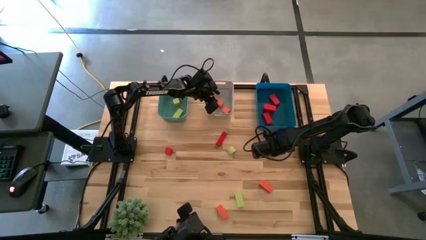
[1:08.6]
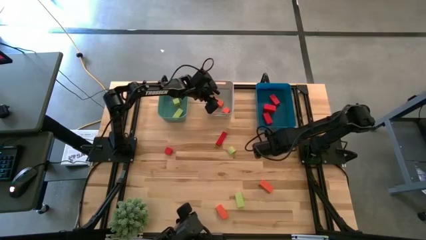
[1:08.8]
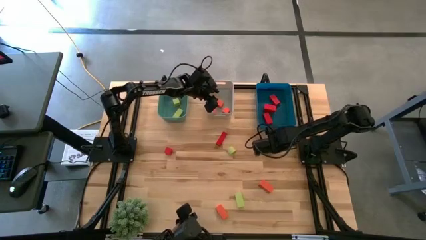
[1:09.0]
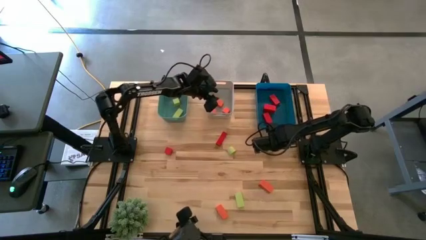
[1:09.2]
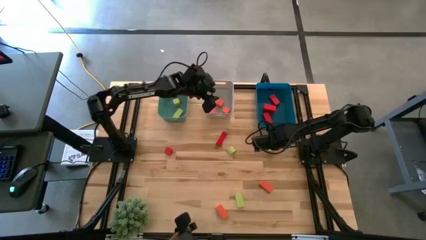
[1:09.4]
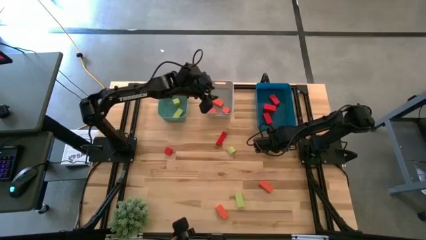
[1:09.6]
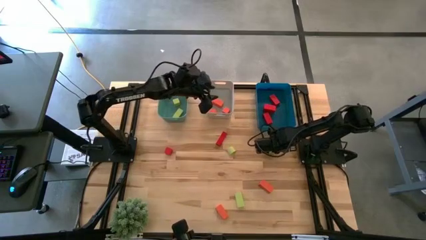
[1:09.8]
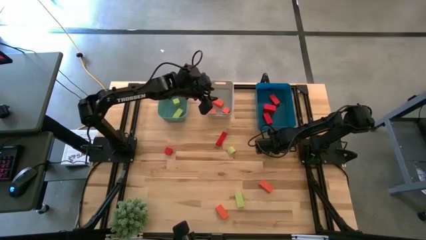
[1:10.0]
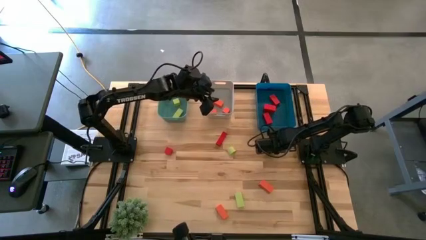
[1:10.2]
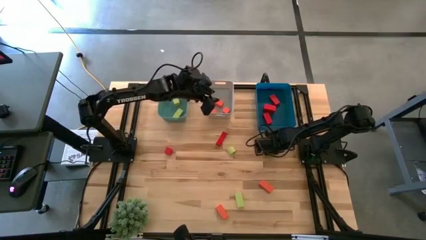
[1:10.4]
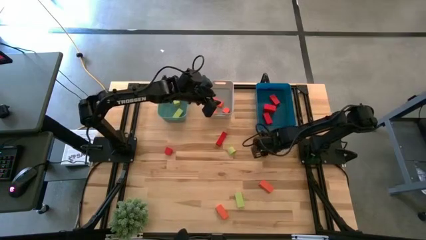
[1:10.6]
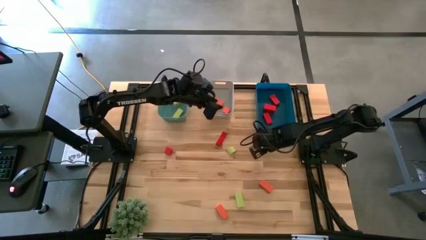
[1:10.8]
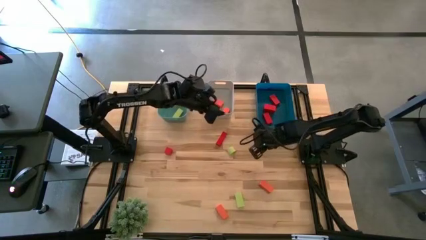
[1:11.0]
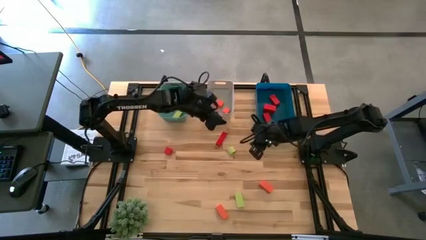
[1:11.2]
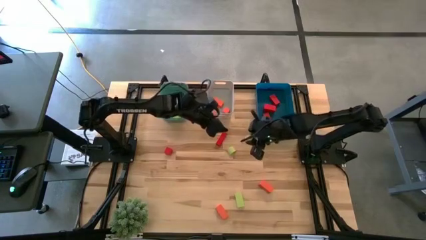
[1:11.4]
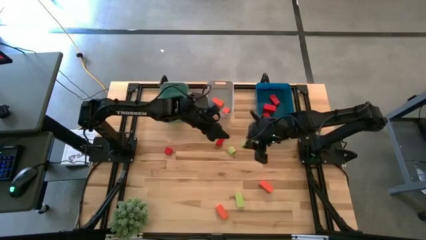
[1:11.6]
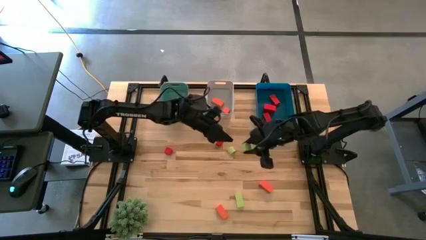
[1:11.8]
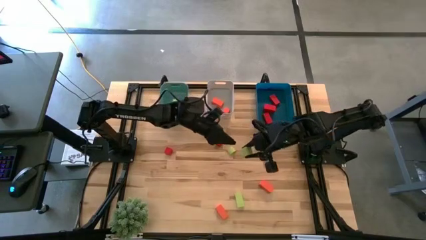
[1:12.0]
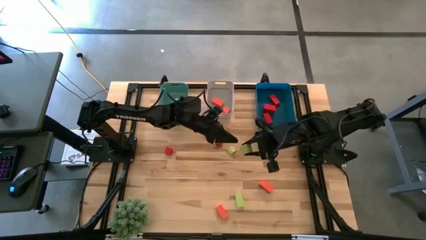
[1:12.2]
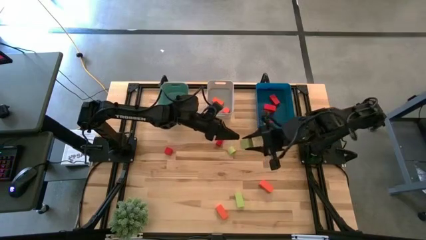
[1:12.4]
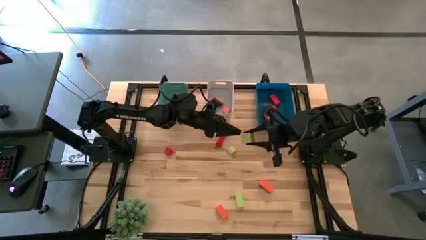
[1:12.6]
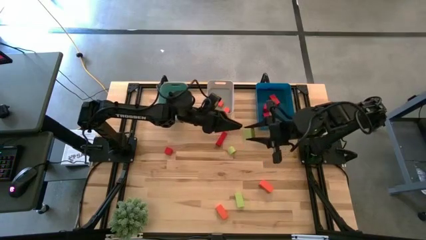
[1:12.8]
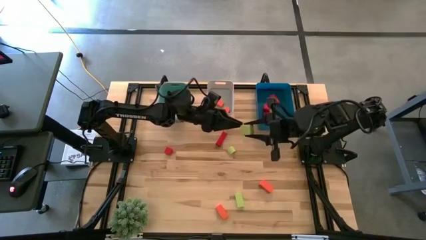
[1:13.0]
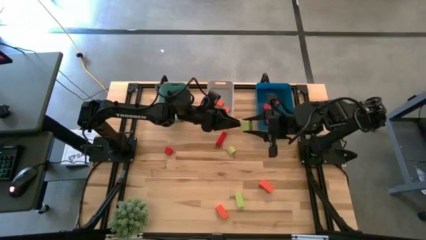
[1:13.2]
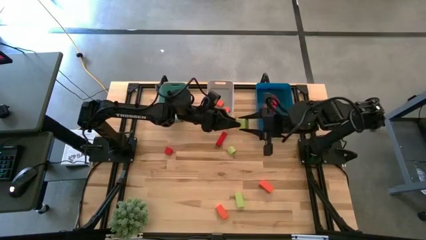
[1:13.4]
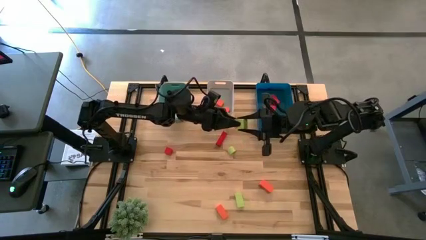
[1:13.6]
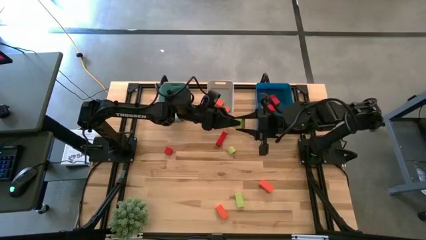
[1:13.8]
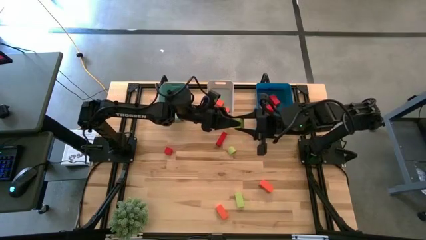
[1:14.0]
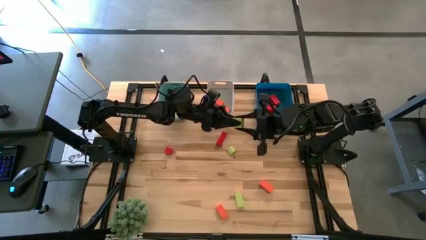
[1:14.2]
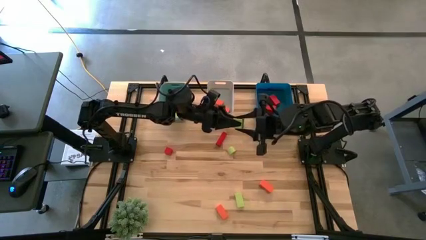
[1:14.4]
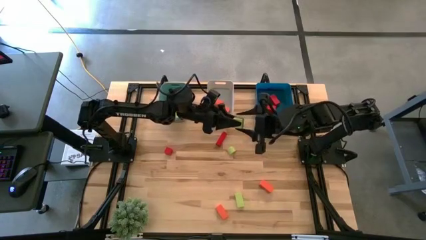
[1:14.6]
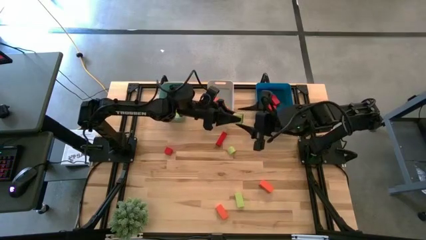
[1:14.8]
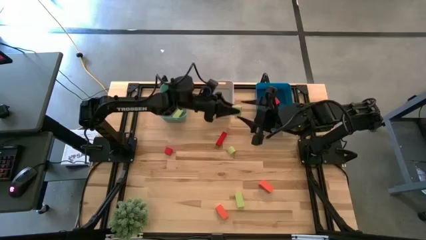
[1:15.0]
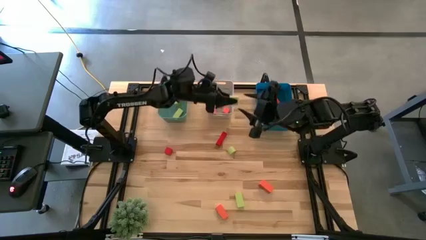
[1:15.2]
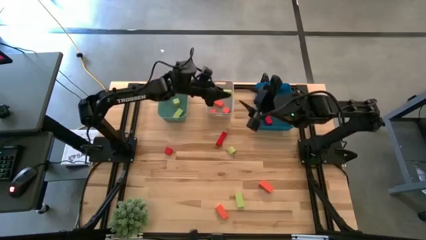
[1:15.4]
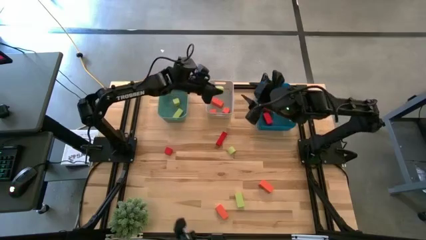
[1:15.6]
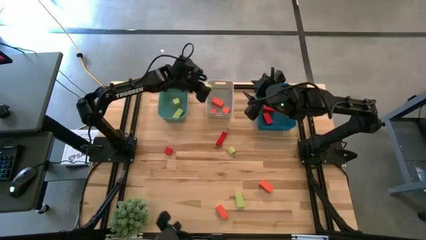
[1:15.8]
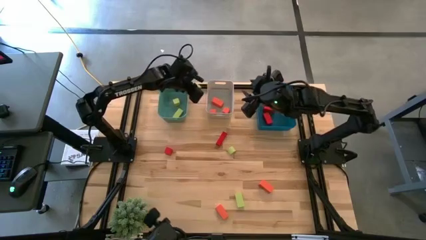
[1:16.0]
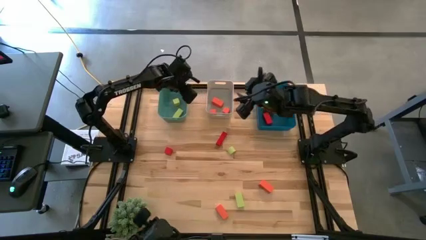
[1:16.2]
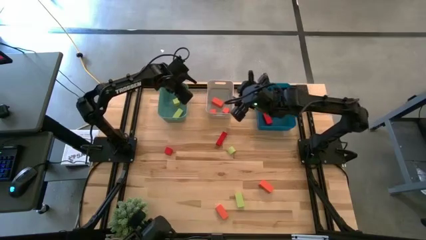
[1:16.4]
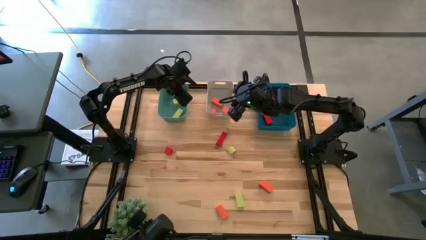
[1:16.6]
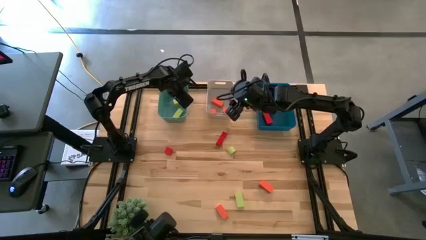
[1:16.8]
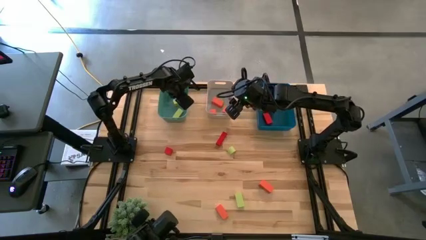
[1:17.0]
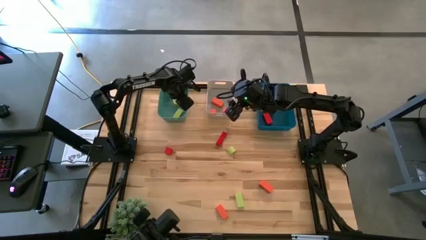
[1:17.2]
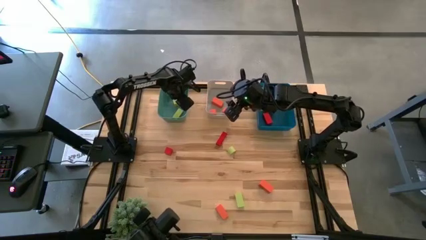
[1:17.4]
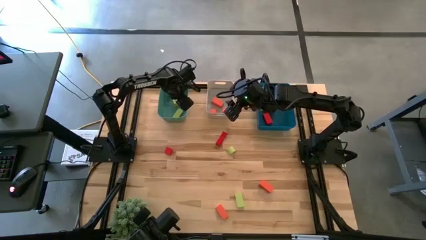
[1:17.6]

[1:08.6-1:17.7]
Task: Sort & place blocks by color
Put the green block into the green bin

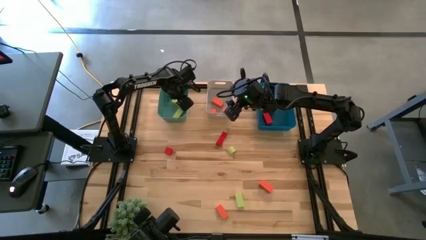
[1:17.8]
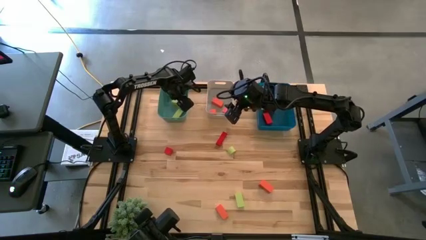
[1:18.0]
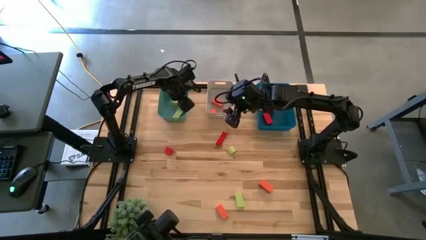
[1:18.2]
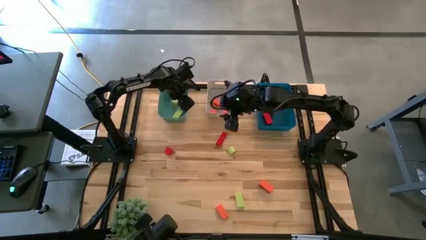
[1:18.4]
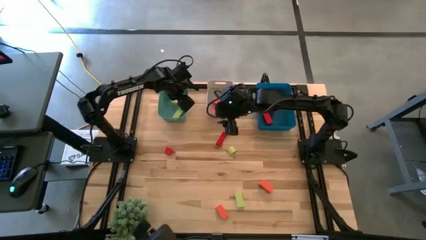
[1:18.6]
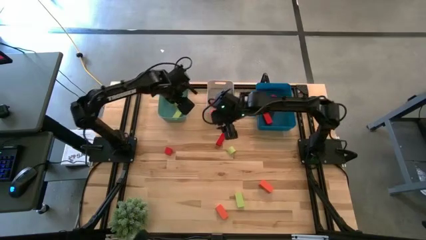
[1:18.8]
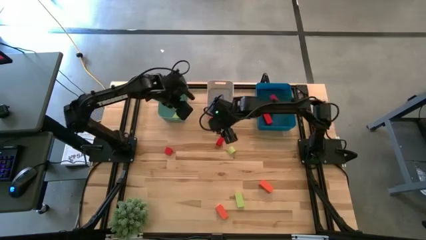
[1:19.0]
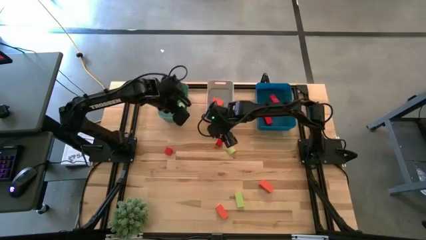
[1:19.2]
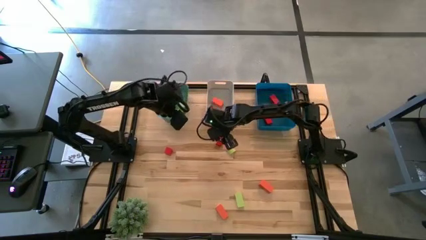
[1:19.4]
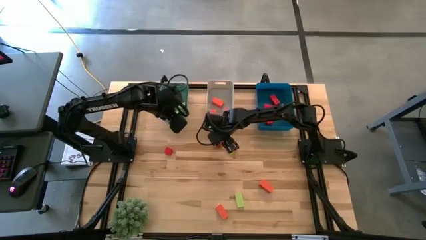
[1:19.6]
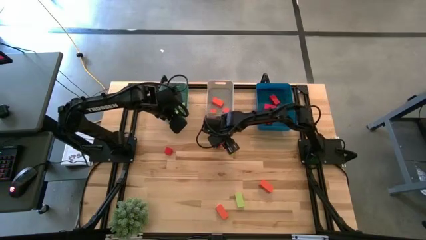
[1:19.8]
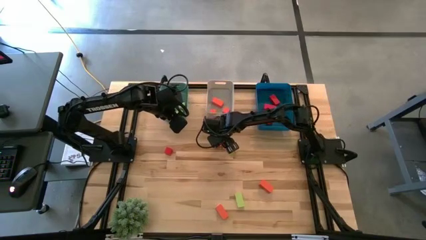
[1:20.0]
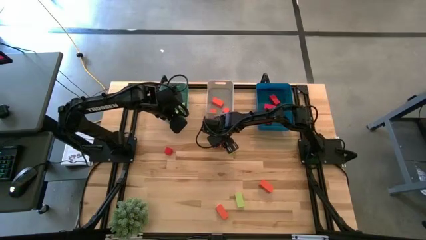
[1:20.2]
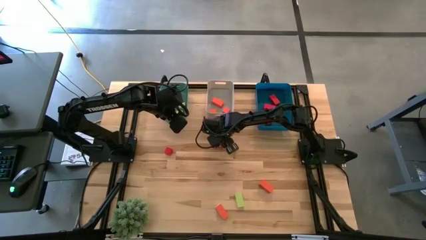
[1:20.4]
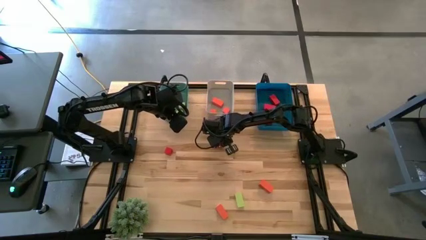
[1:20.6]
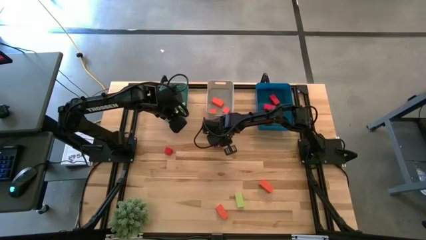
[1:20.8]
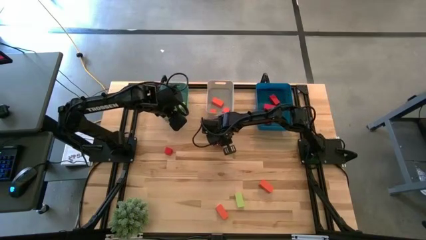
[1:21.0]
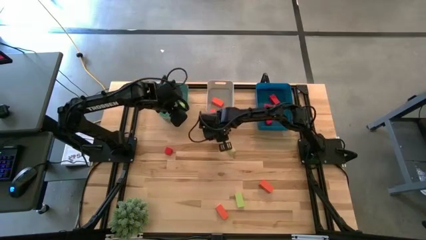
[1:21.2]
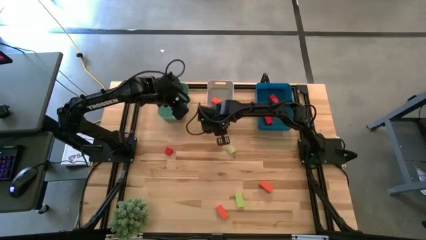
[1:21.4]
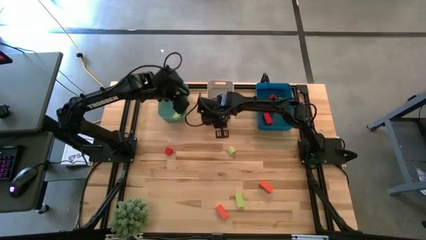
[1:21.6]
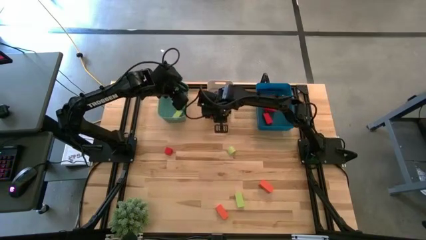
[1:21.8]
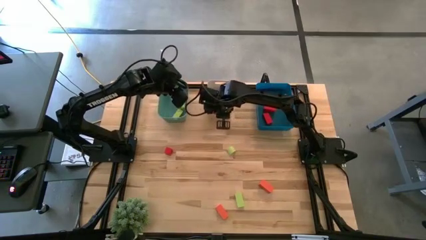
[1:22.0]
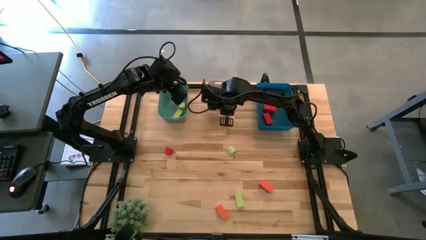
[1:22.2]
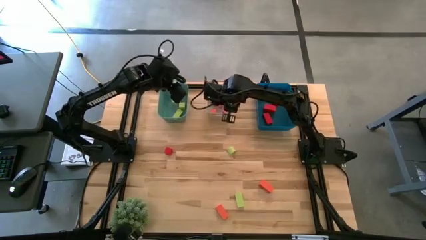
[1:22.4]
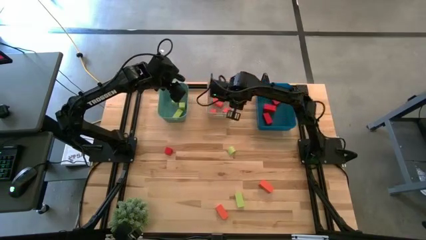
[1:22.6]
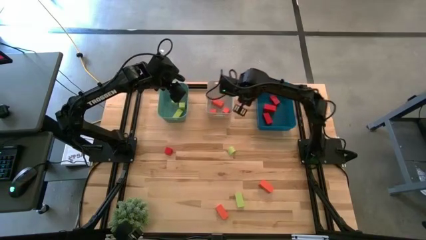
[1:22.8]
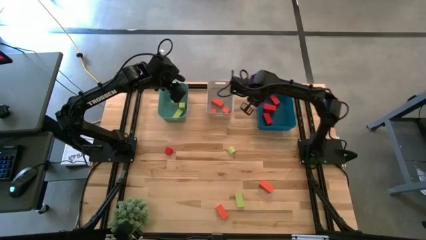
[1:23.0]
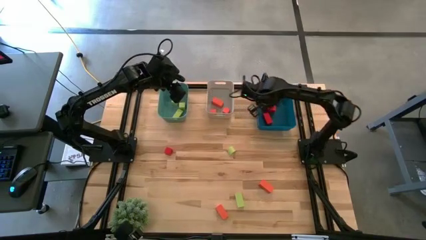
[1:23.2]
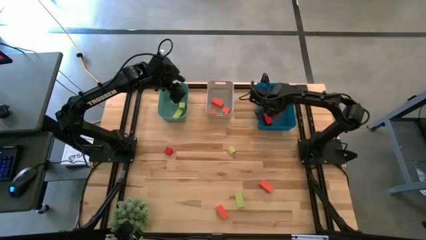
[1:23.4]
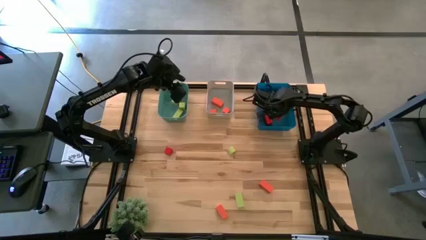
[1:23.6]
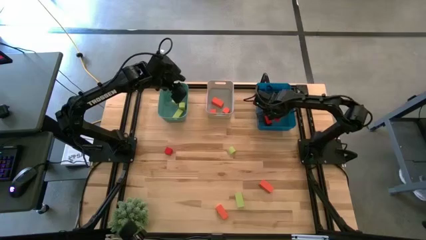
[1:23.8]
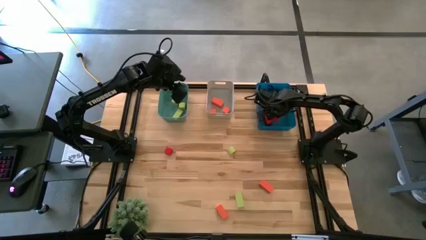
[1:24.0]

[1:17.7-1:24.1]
Put the red block into the blue bin

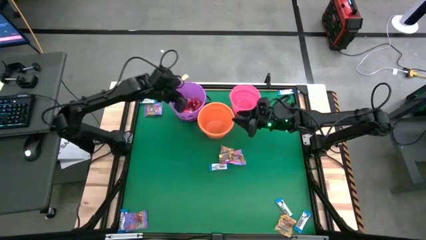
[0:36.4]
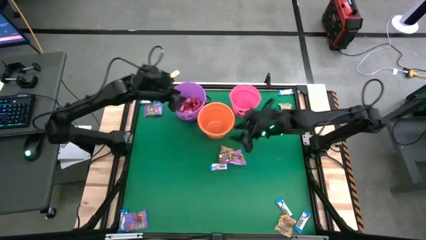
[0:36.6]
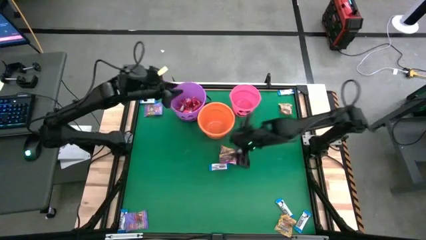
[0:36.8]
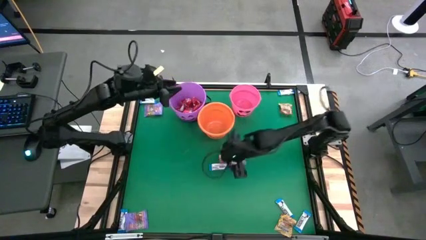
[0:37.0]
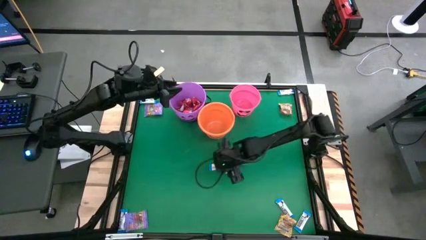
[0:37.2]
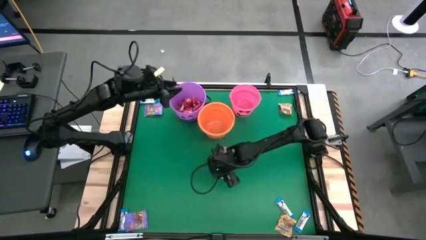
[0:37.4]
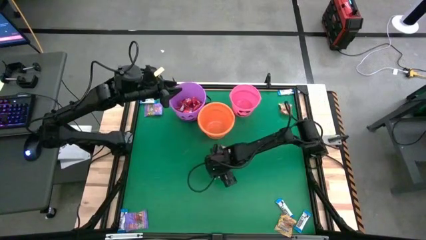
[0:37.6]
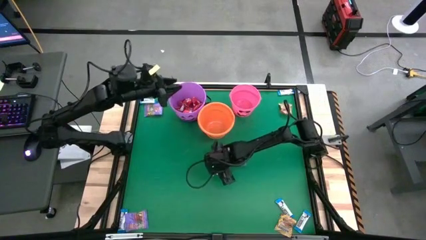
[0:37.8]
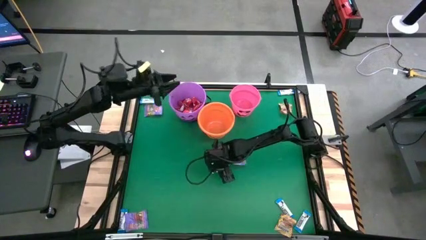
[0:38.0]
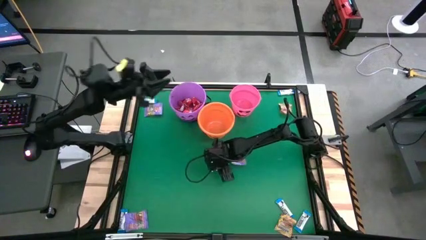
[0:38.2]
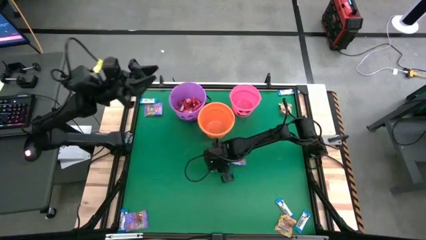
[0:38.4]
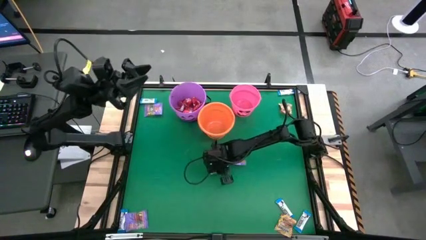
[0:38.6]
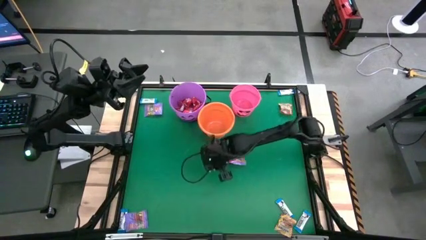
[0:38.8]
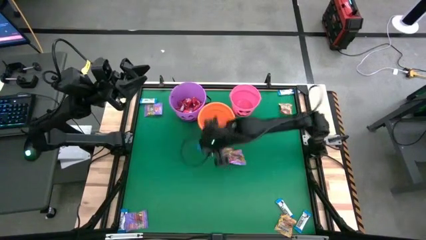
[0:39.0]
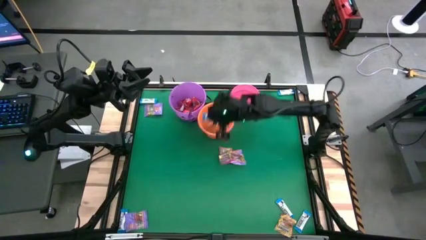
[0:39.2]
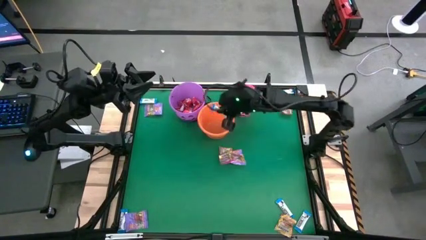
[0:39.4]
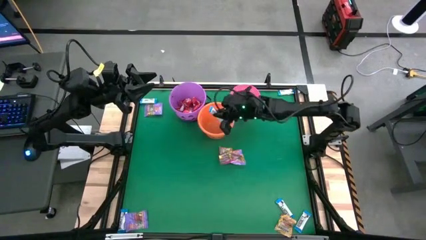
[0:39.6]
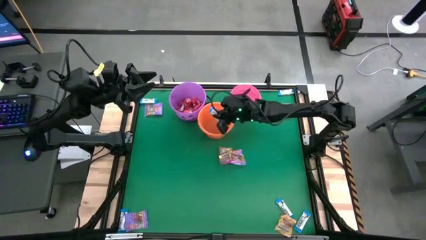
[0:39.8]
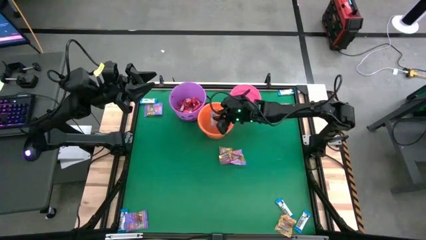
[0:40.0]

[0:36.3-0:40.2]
Task: Sort candy by brand, put in halloween buckets
Put the white chocolate into the orange bucket
